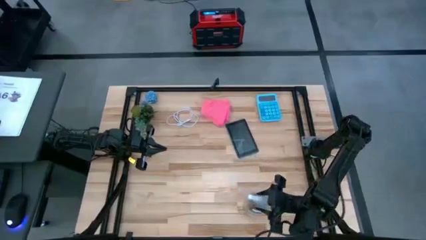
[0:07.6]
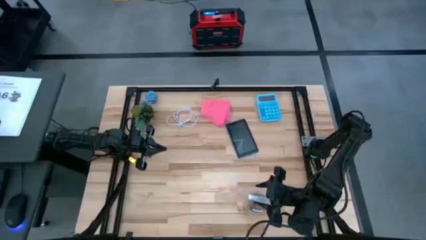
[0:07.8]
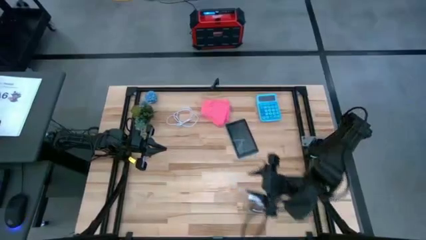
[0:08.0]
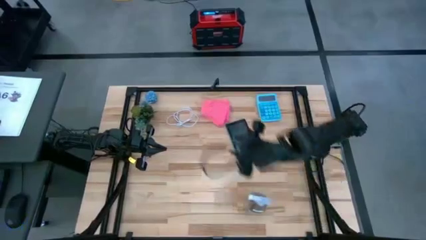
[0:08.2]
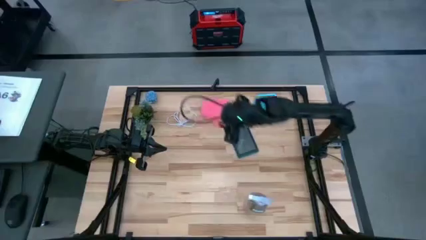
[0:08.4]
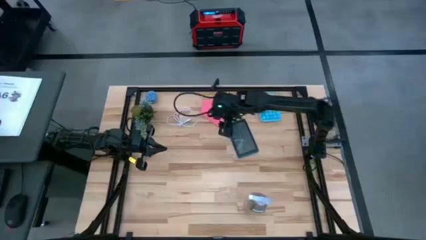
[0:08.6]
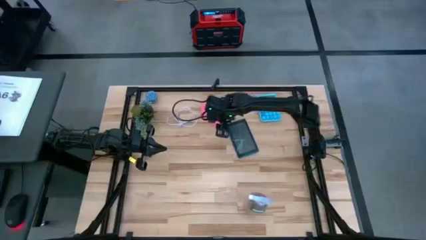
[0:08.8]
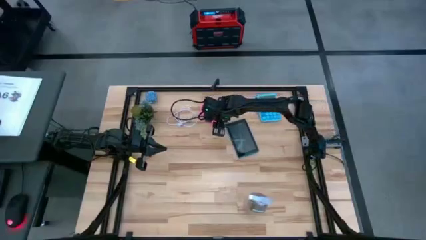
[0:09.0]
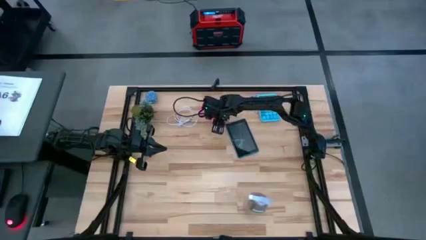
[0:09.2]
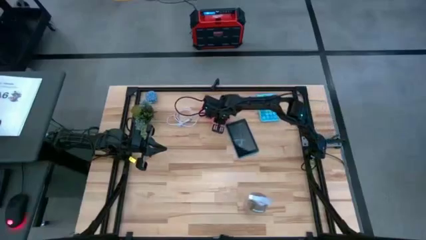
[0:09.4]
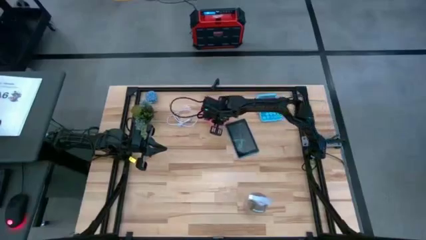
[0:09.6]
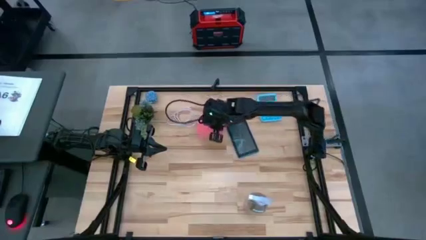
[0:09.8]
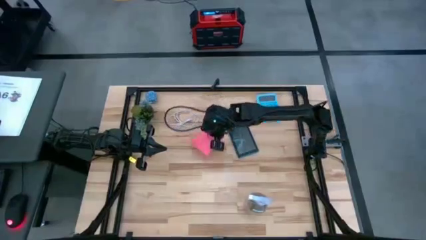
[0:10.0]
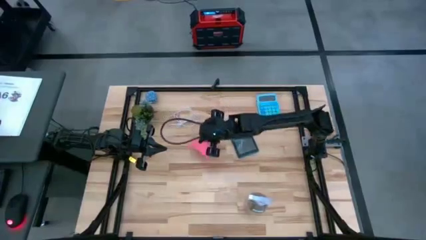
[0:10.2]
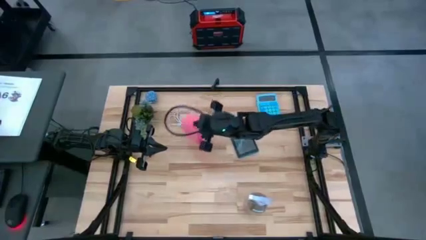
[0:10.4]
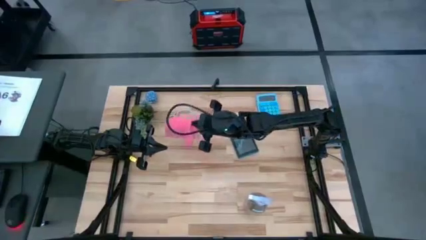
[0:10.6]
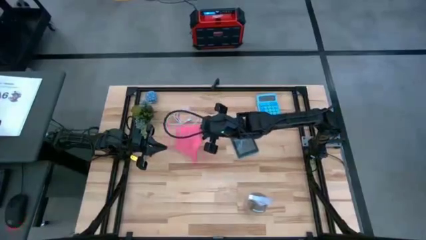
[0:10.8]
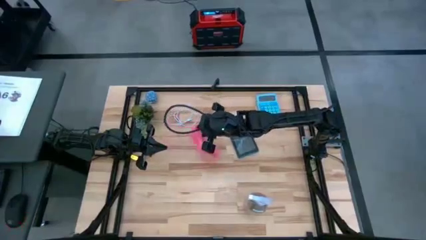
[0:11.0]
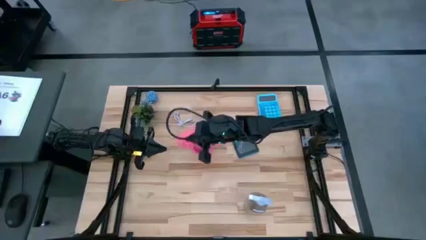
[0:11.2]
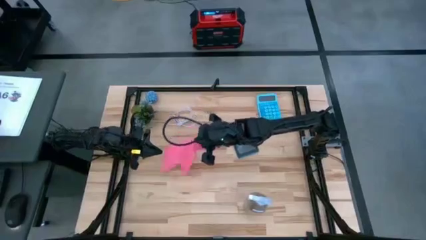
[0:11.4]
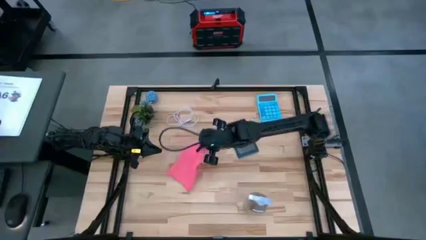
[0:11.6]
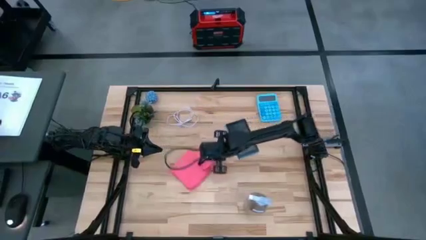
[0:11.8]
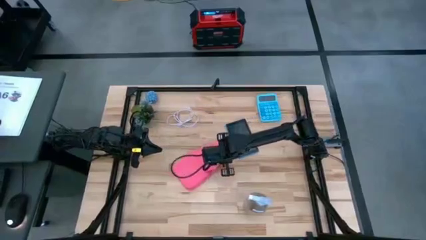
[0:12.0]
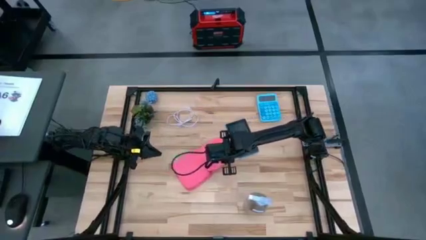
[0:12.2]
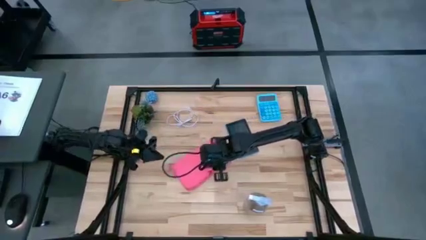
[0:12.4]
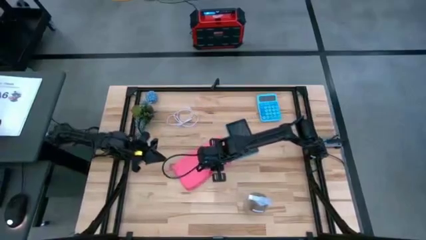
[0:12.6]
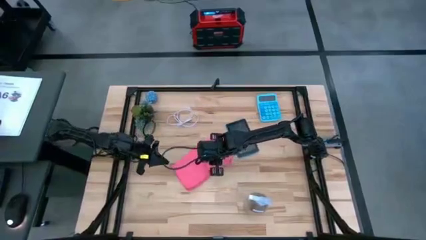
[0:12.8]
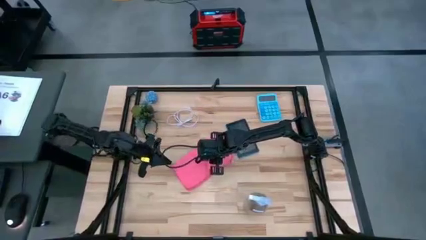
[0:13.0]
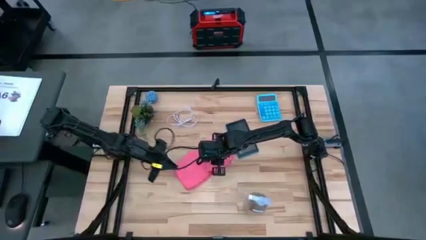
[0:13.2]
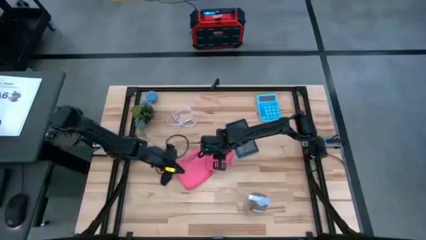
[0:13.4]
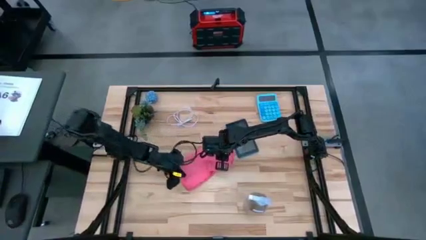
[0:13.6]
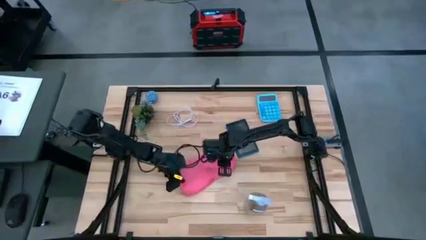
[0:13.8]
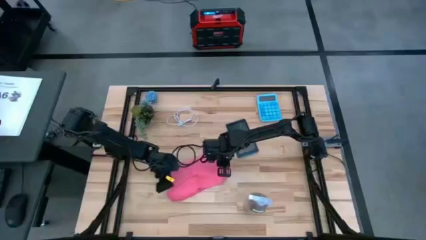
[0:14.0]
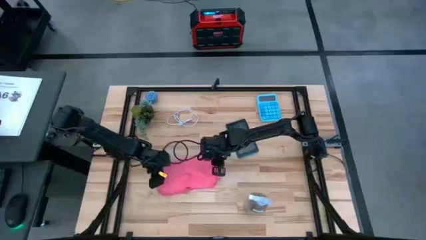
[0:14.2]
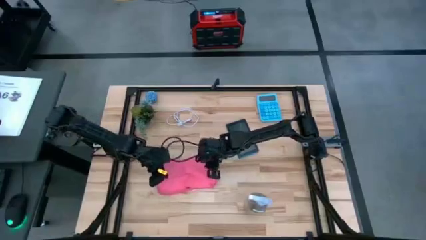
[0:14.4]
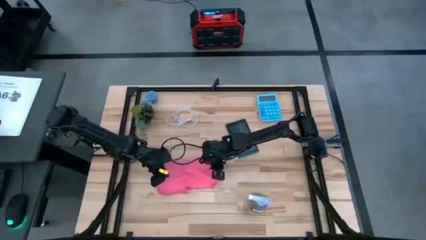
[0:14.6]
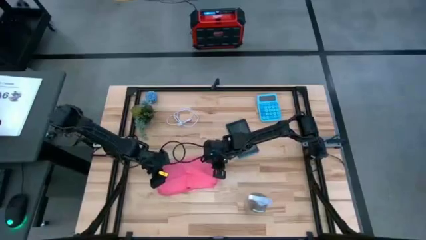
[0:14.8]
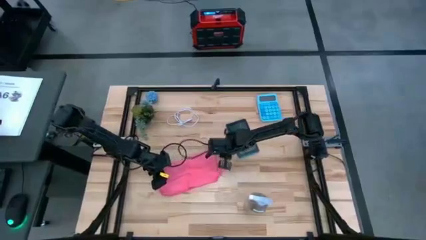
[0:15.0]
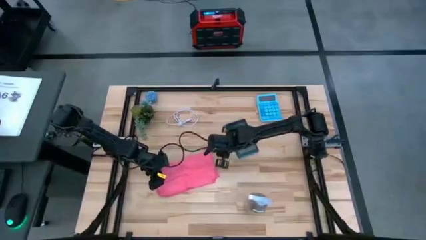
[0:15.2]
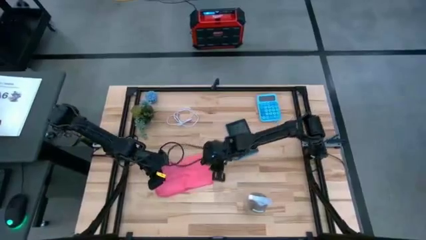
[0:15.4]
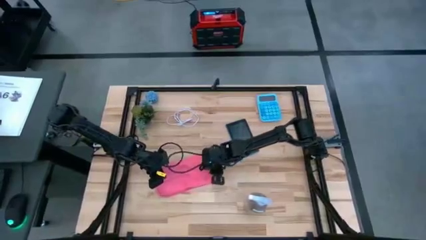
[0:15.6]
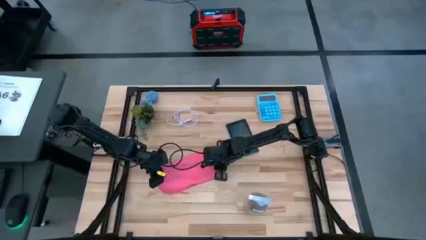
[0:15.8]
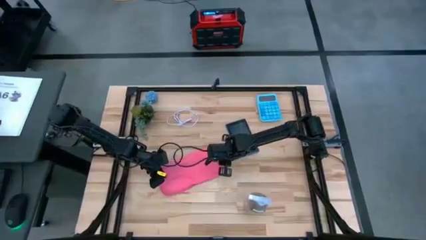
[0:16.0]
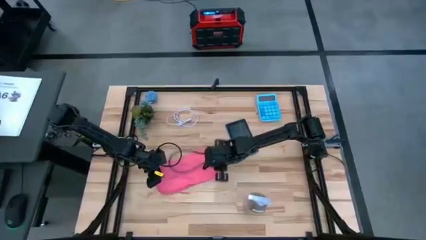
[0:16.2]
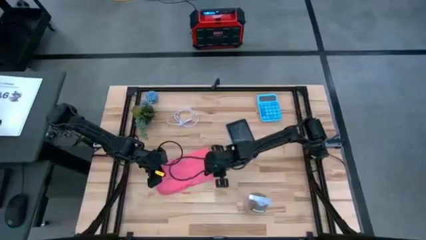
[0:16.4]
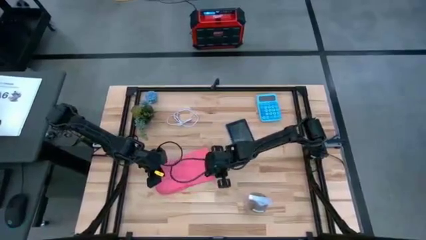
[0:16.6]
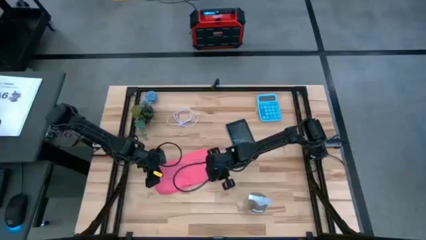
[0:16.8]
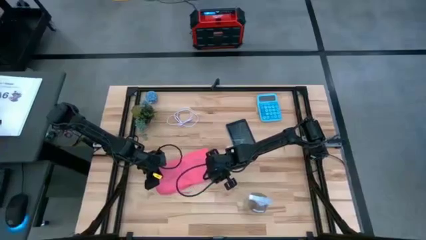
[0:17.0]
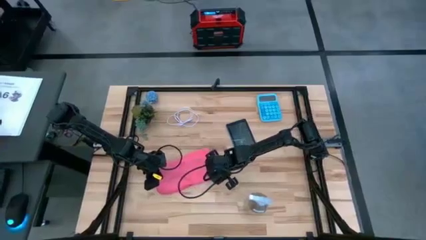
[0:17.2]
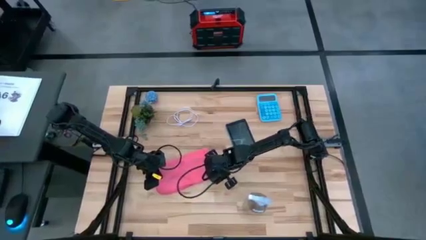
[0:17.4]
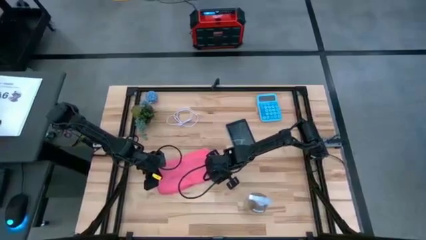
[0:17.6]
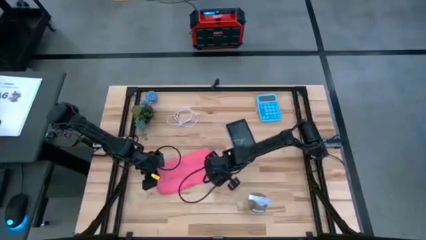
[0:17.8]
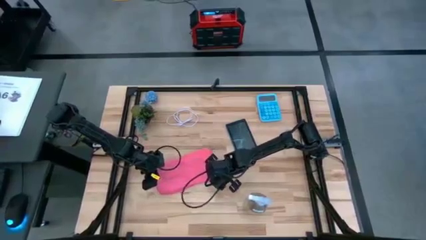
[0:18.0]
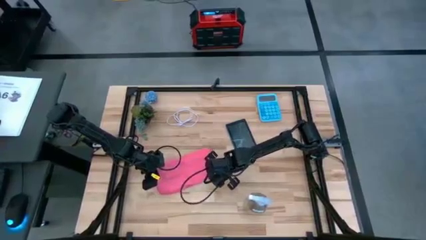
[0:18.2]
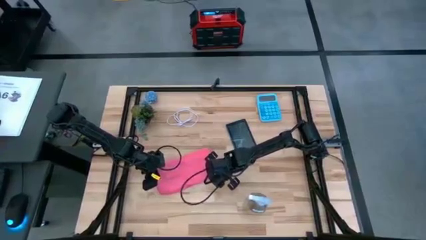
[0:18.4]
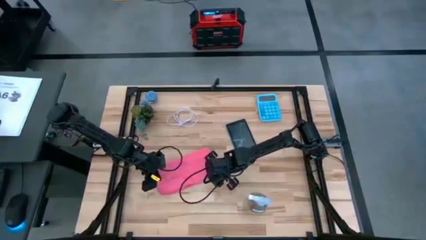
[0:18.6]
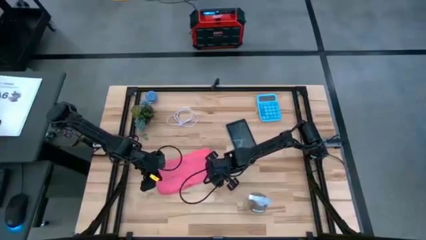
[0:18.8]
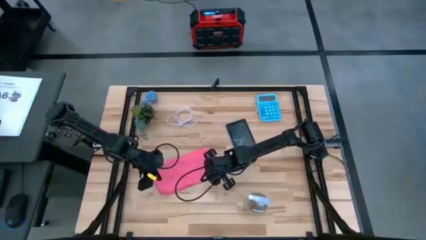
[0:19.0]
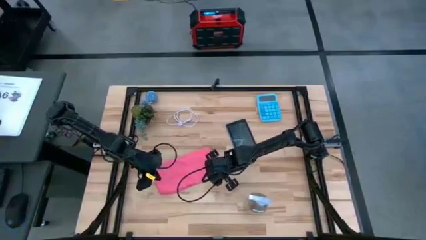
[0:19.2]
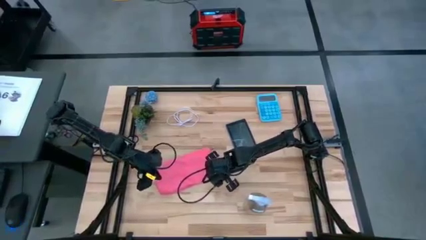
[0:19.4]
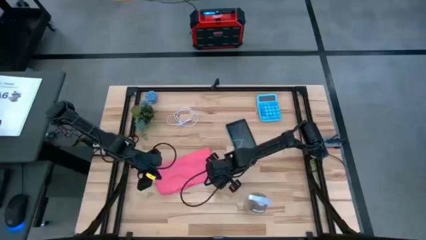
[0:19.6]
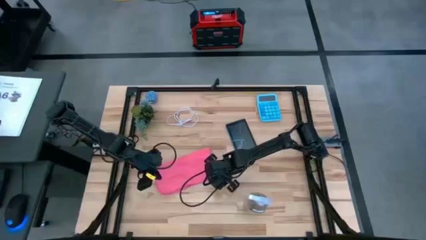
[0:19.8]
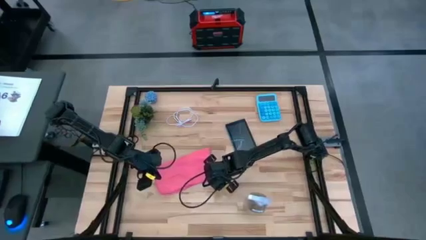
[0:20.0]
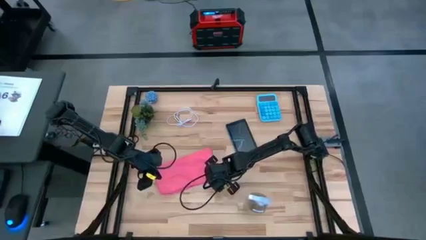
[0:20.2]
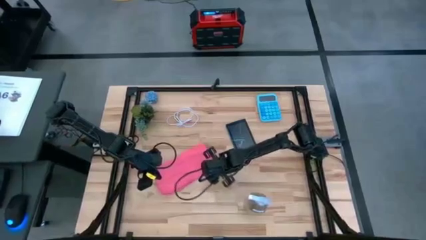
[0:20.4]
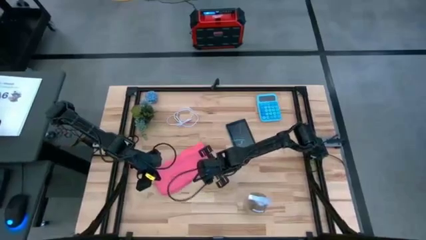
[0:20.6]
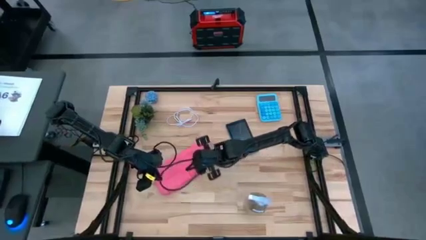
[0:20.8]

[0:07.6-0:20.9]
Task: Apply microfiber cloth
Fold the pink microfiber cloth
